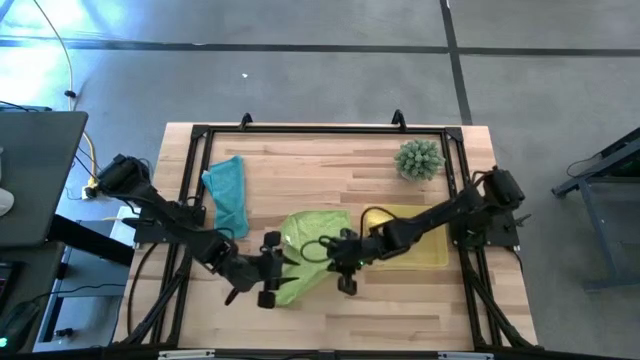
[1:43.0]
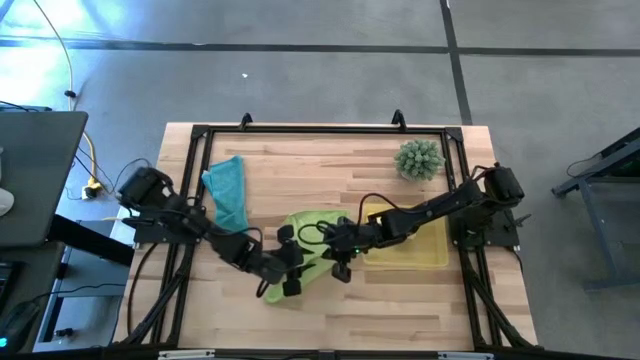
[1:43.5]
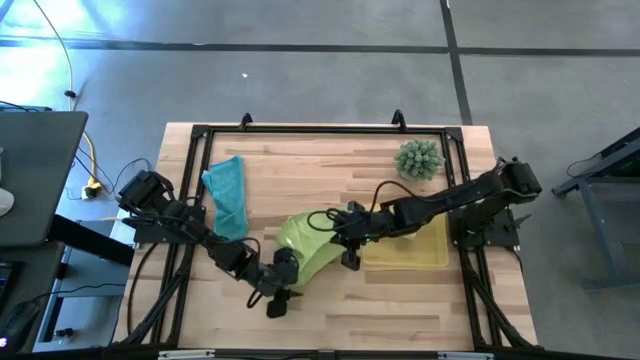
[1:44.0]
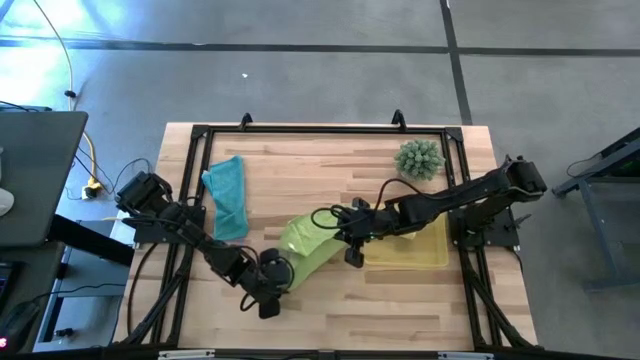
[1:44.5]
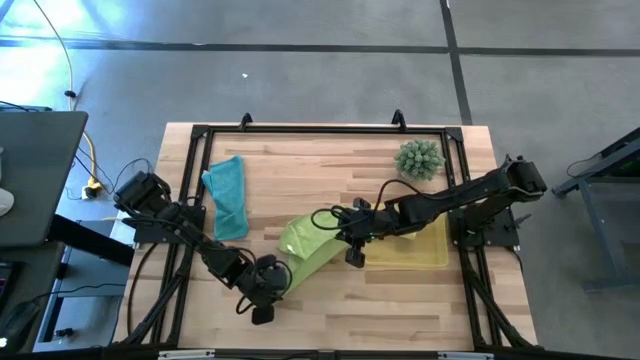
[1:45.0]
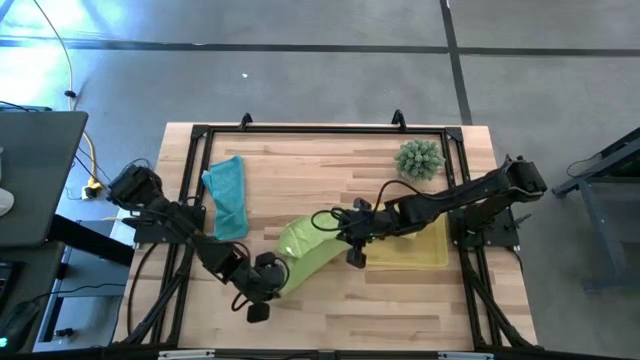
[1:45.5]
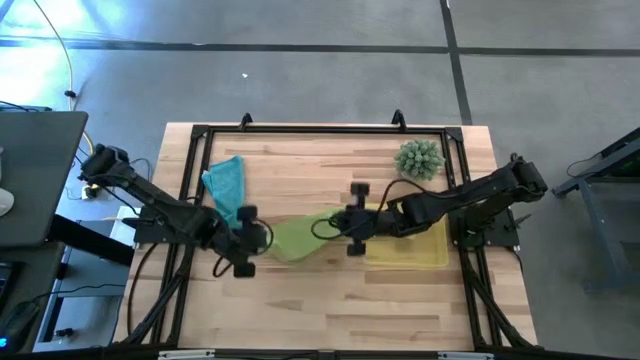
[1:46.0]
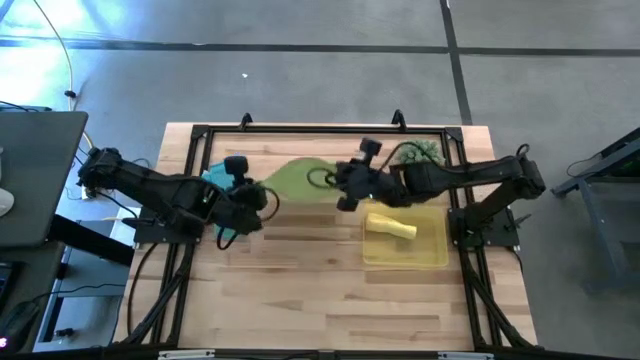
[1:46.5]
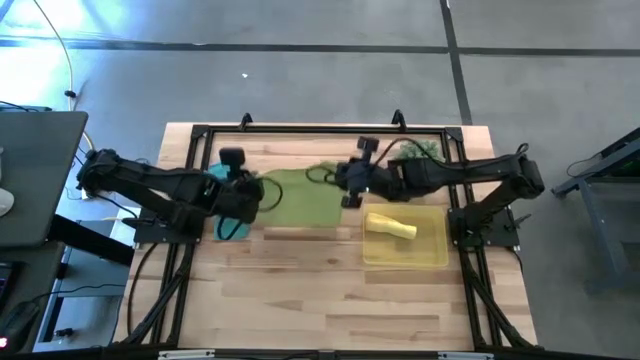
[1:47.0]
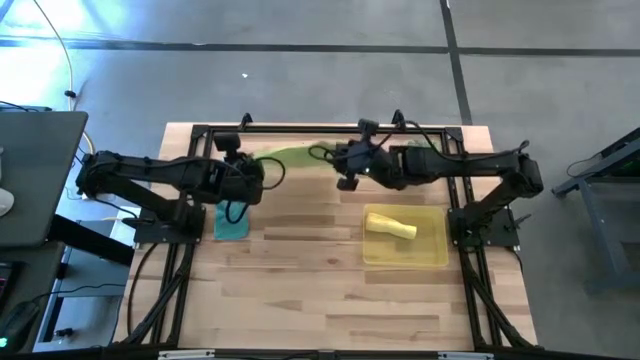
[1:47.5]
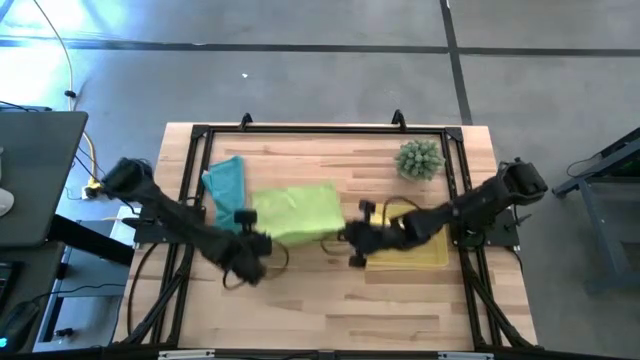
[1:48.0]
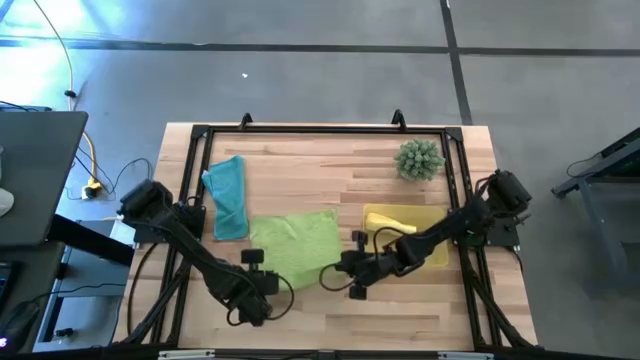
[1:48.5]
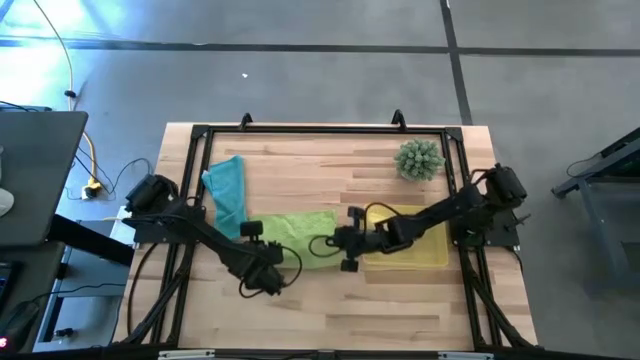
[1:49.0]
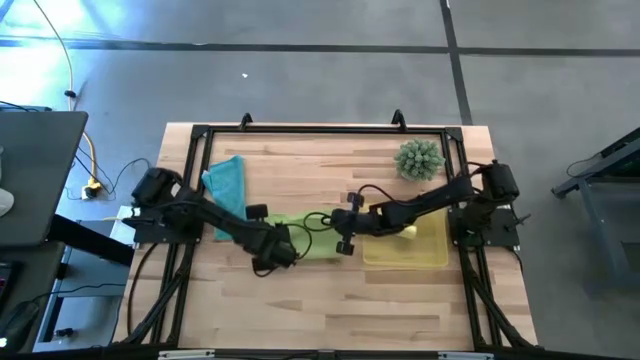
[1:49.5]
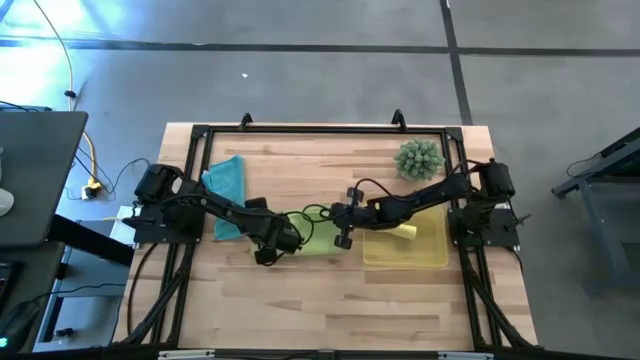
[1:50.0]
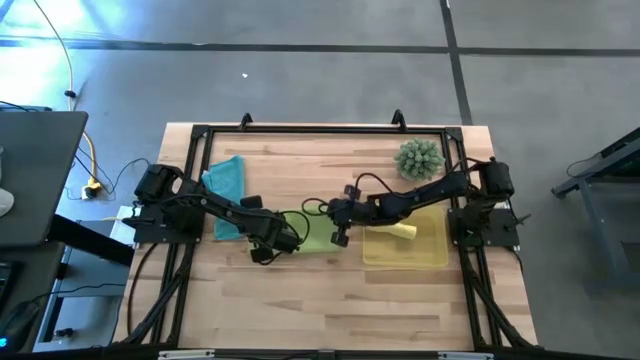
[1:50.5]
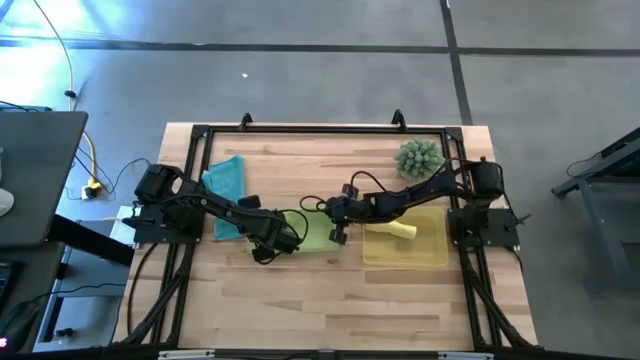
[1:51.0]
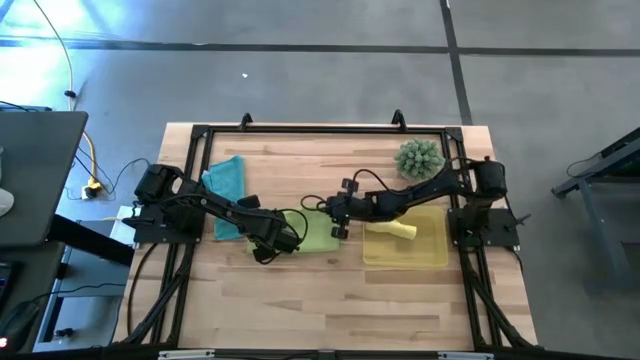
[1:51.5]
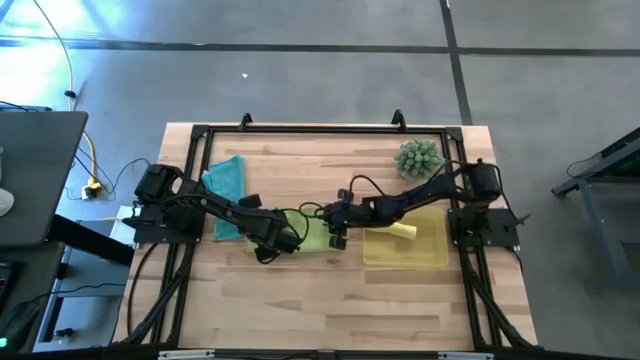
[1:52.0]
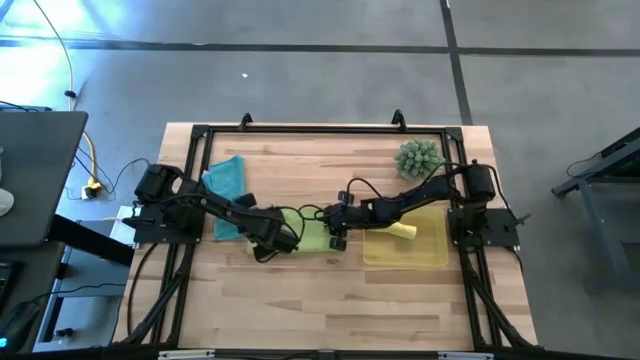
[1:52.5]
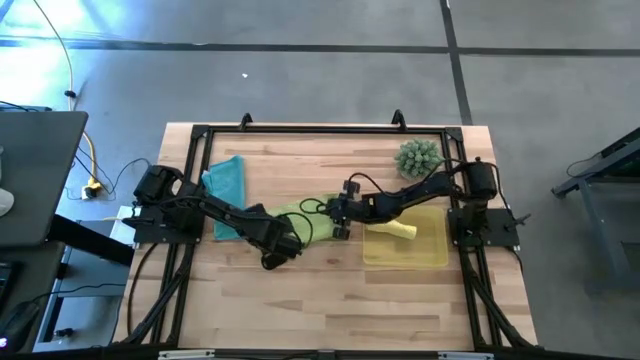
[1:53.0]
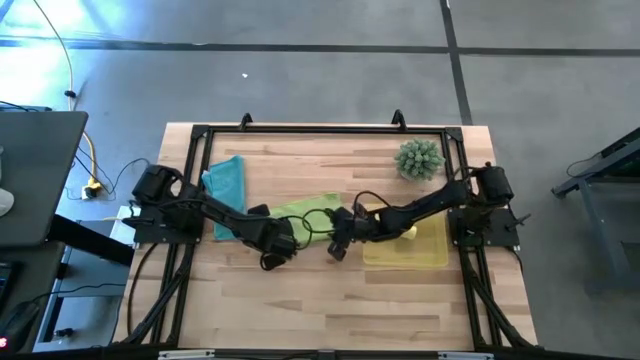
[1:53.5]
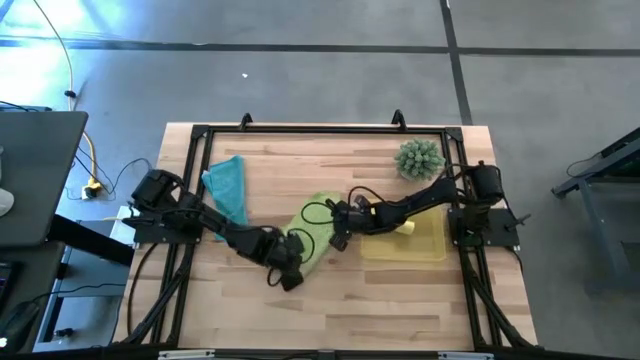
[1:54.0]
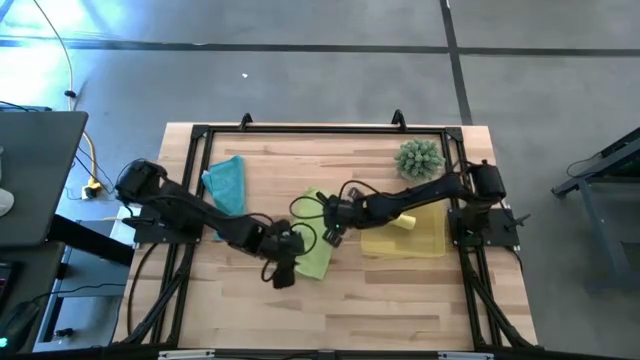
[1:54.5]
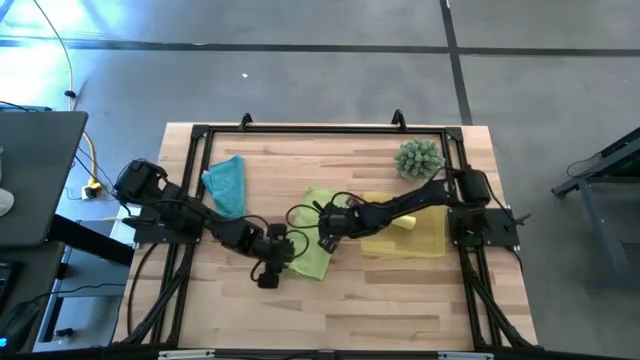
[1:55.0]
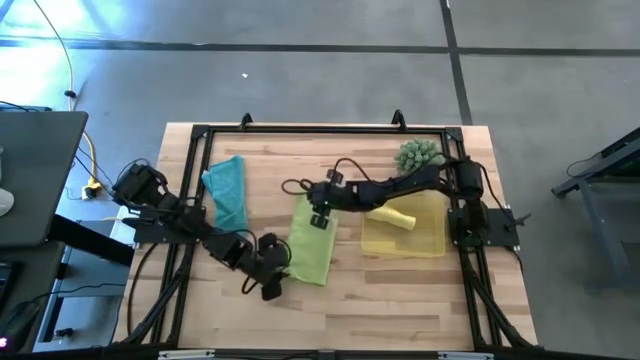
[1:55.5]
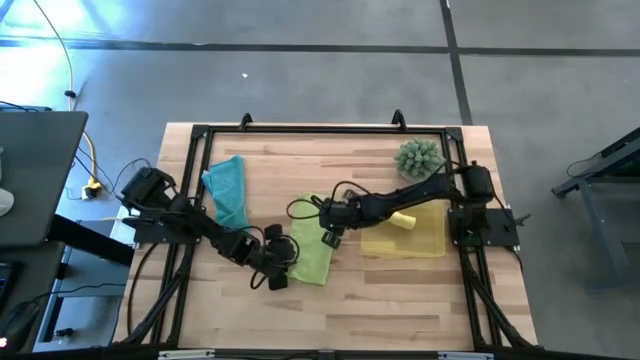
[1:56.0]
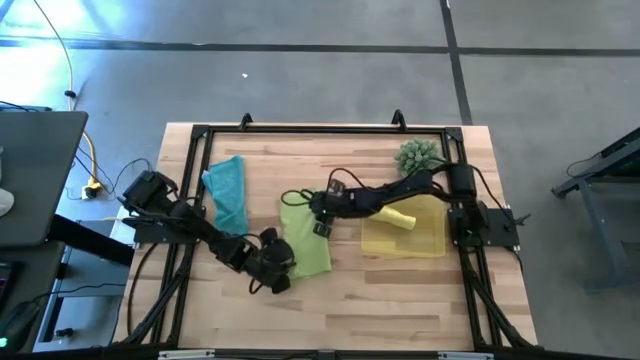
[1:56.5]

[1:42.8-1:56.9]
Task: Roll microfiber towels into tight, uniform cylinder then place into a basket
Fold the green microfiber towel

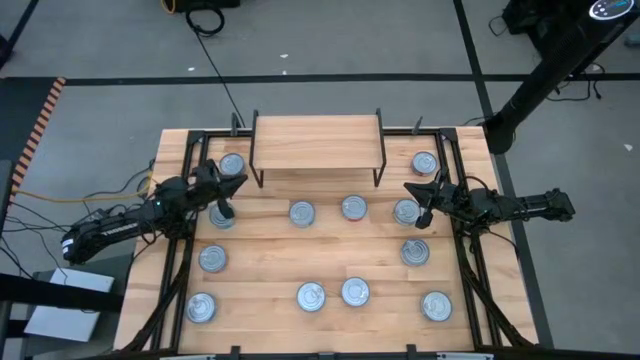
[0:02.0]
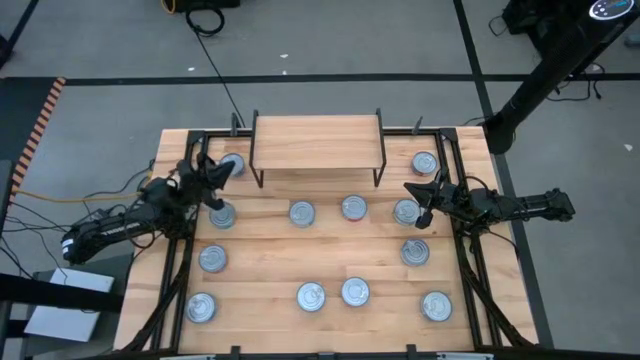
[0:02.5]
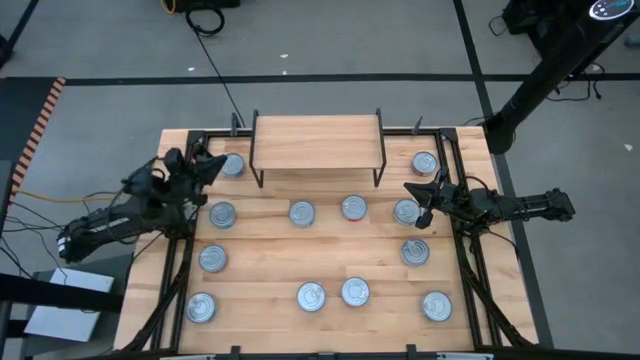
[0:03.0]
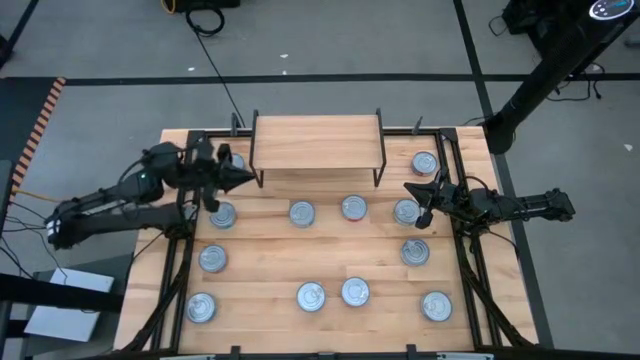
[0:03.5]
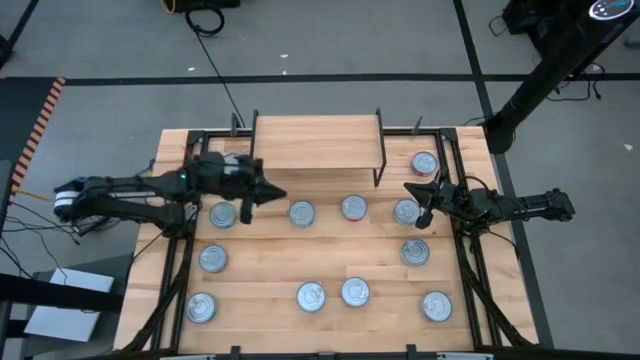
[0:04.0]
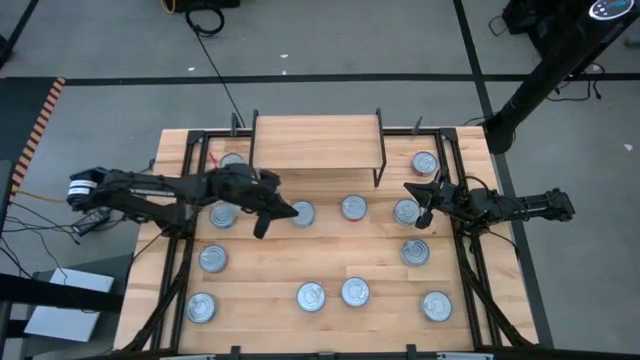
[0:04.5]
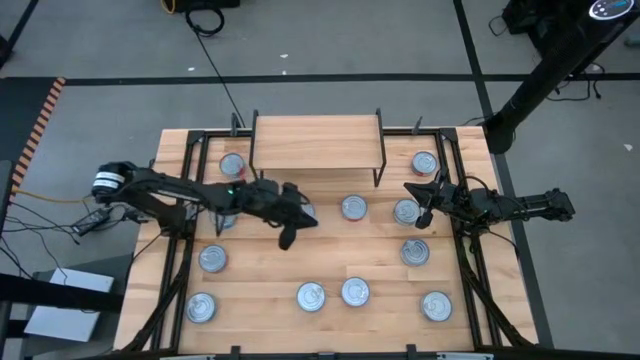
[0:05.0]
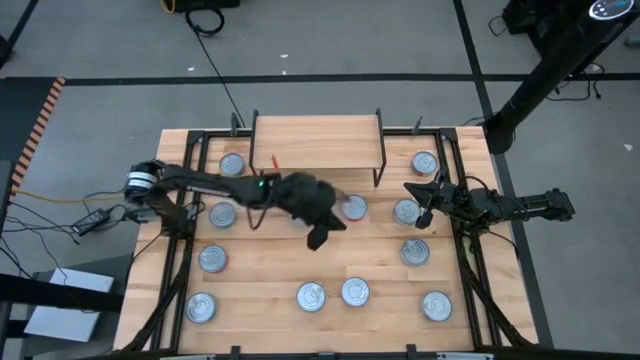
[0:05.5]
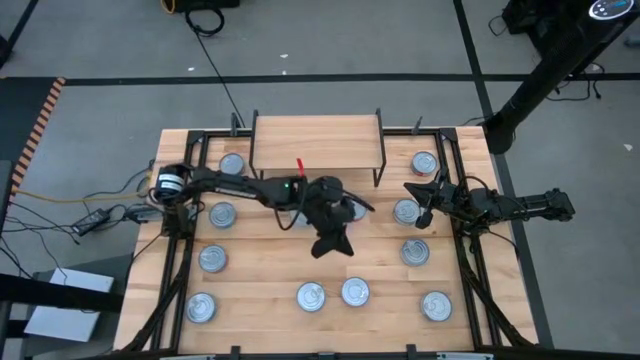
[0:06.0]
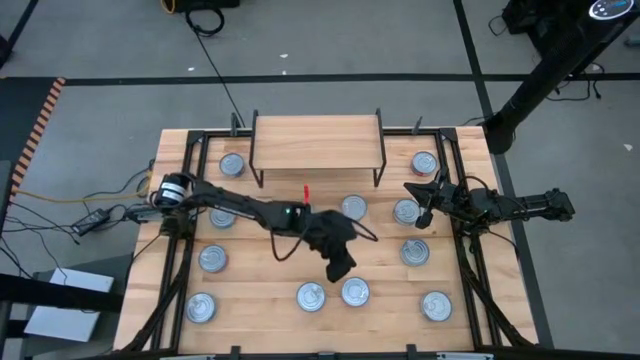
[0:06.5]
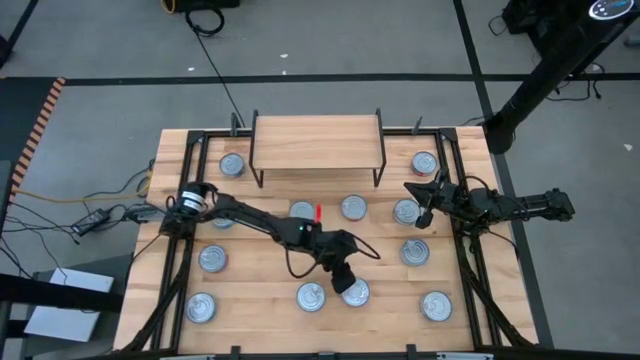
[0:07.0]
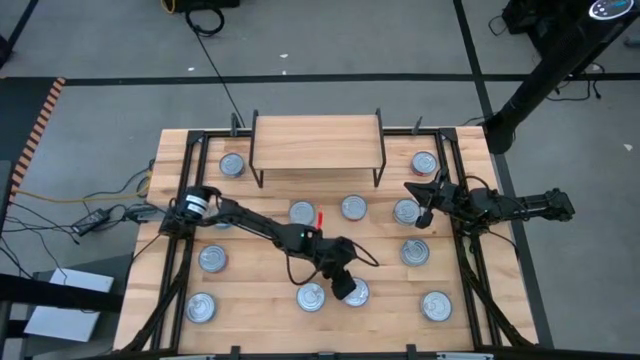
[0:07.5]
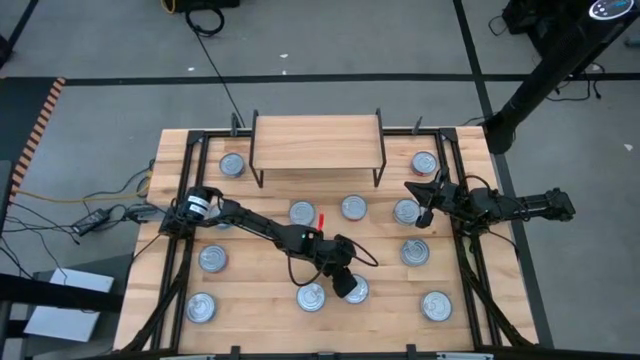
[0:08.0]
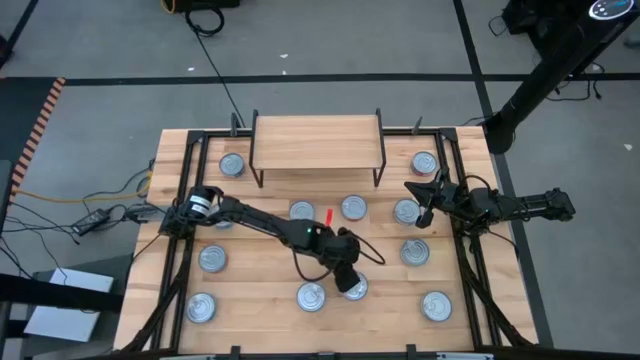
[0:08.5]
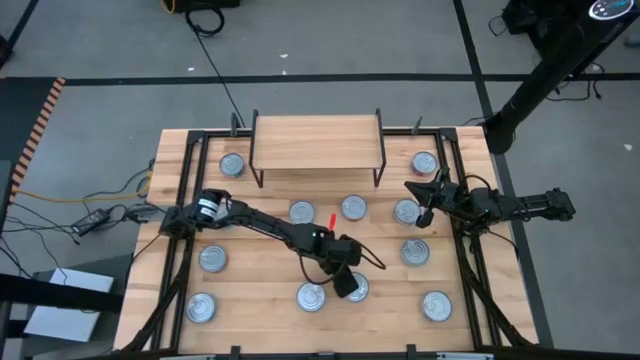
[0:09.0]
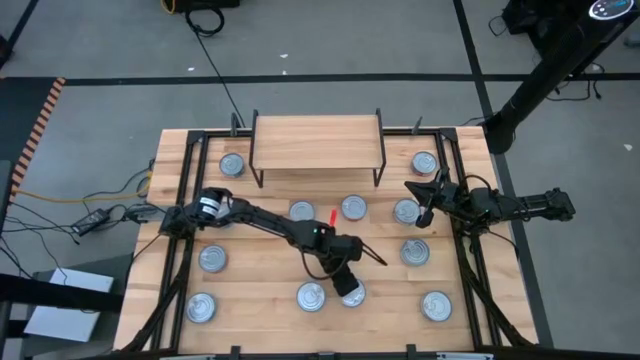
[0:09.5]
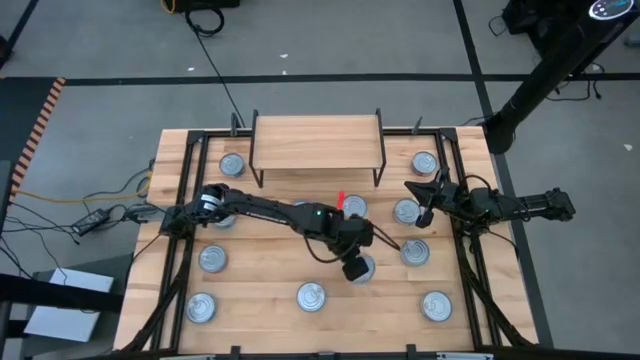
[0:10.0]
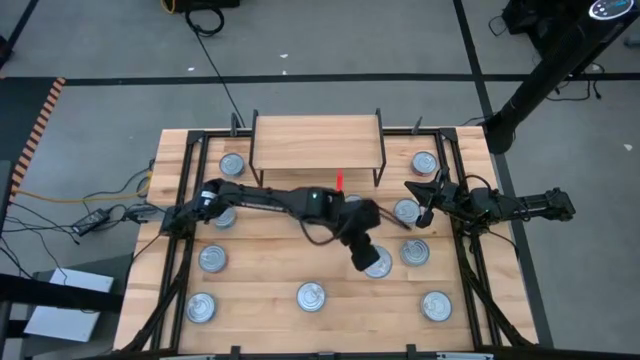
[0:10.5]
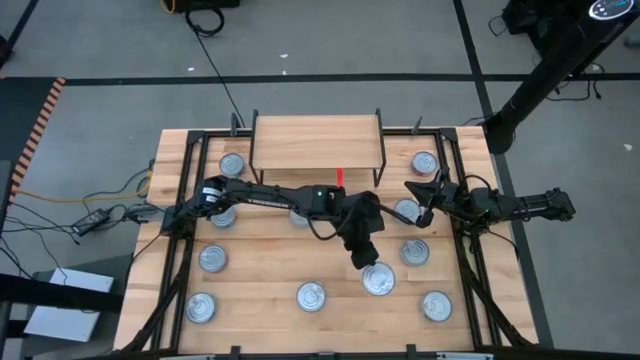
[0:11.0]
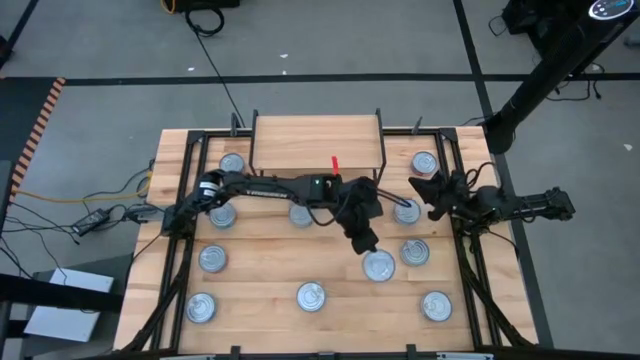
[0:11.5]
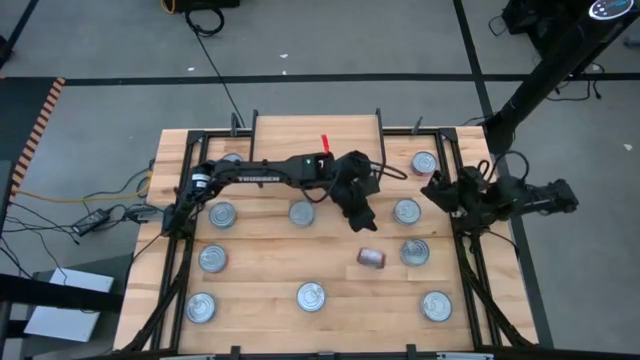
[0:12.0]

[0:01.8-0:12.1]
Task: Stack canned seafood by type on shelf
Put the right red tuna can on the shelf
